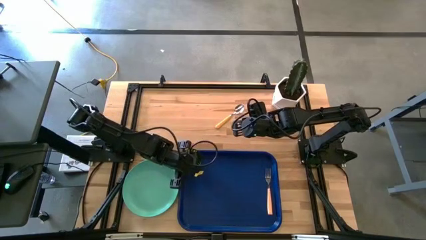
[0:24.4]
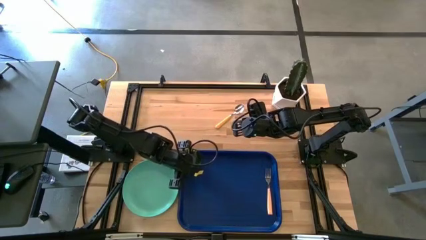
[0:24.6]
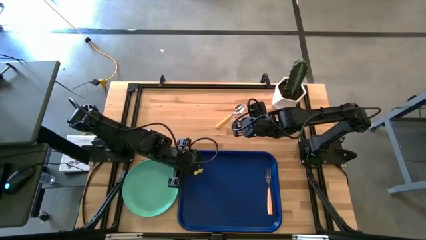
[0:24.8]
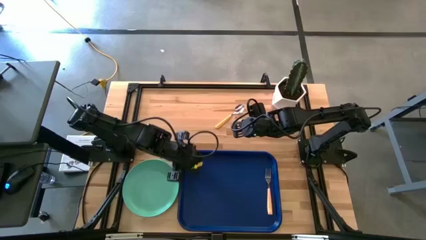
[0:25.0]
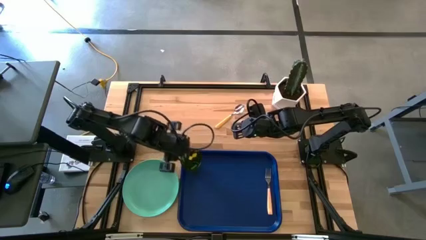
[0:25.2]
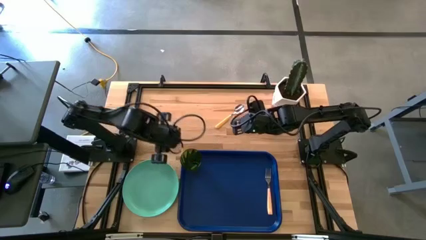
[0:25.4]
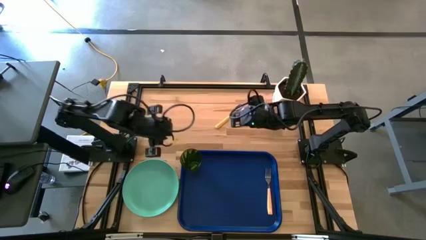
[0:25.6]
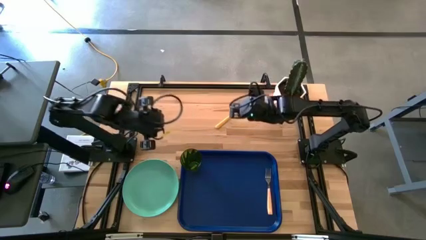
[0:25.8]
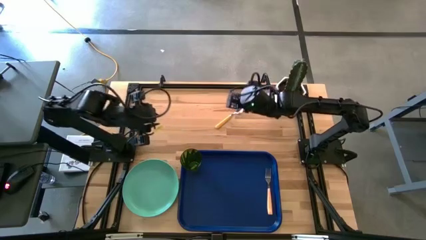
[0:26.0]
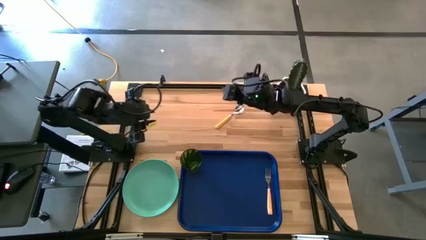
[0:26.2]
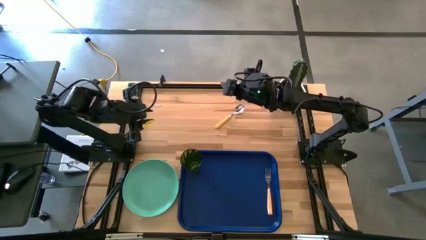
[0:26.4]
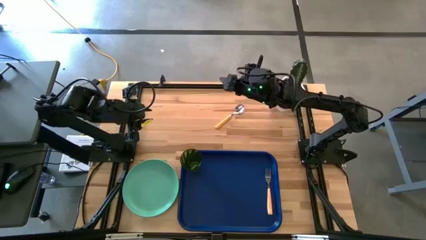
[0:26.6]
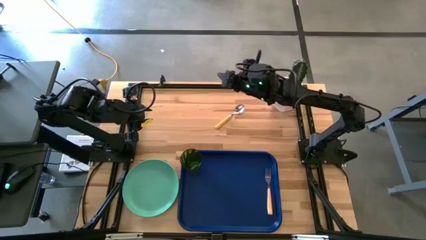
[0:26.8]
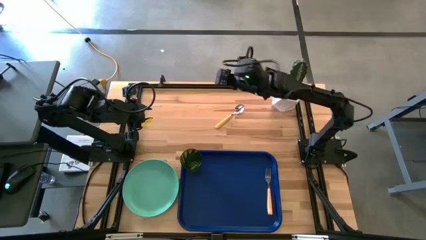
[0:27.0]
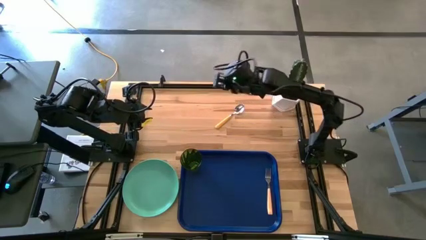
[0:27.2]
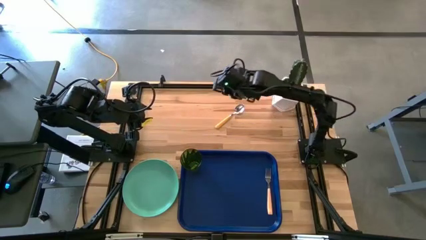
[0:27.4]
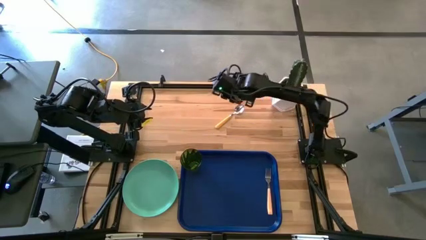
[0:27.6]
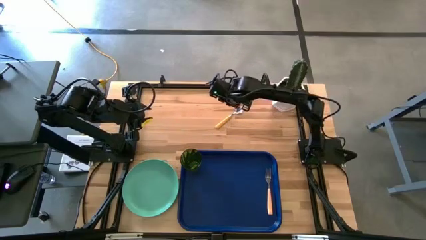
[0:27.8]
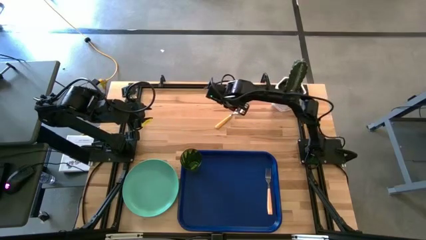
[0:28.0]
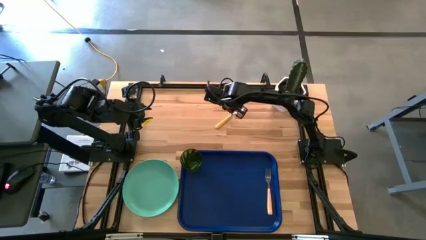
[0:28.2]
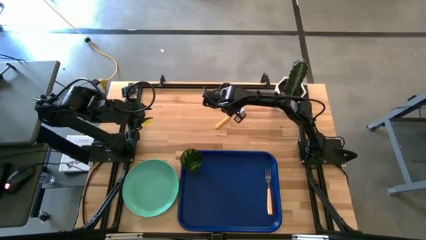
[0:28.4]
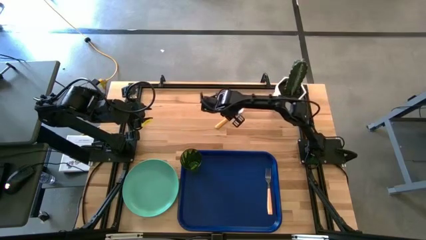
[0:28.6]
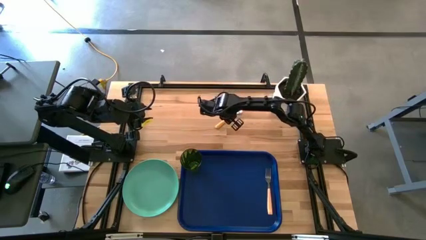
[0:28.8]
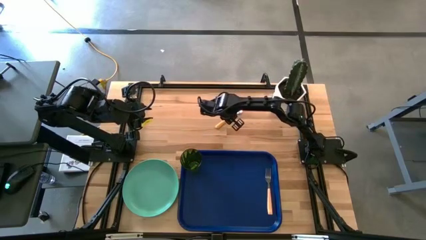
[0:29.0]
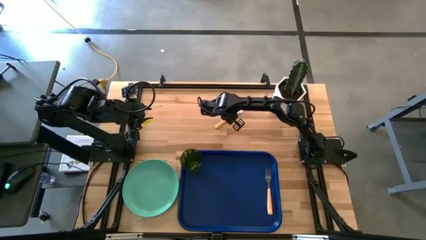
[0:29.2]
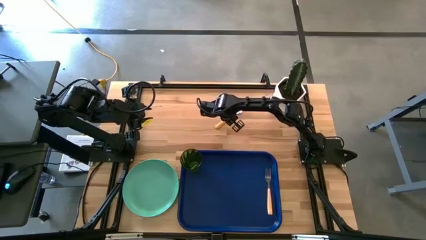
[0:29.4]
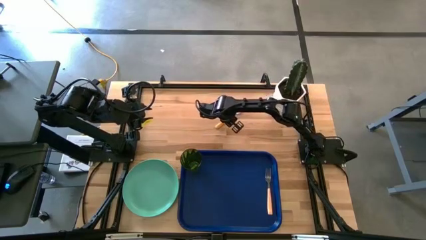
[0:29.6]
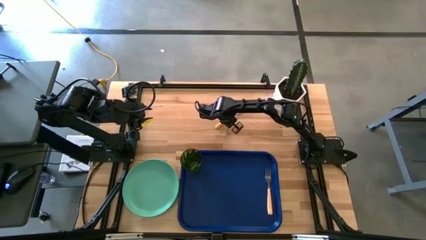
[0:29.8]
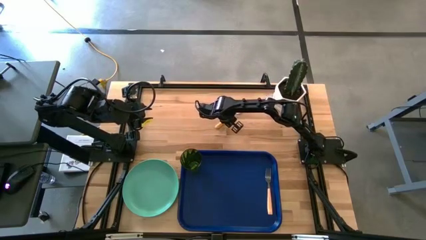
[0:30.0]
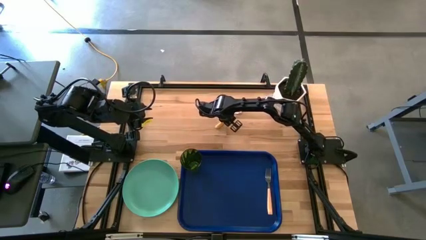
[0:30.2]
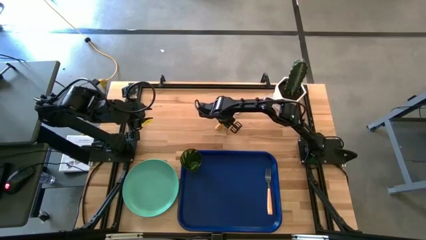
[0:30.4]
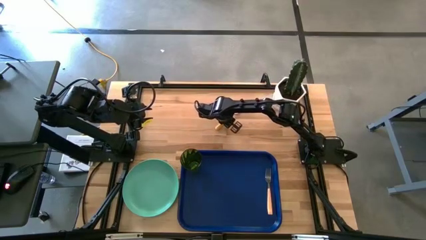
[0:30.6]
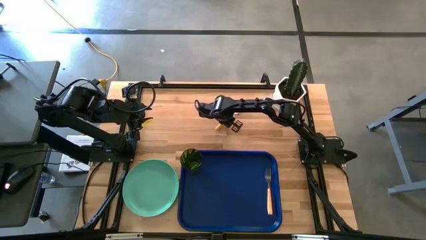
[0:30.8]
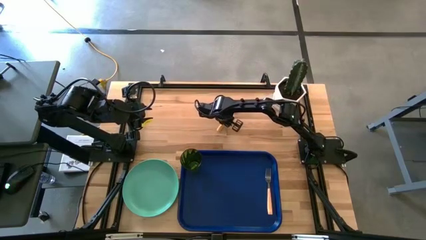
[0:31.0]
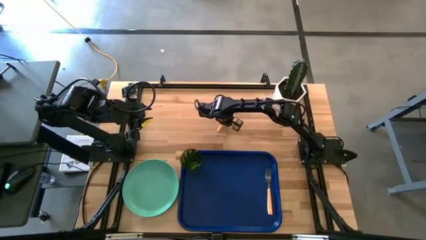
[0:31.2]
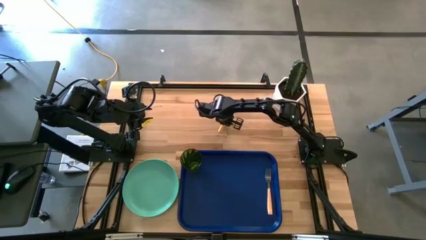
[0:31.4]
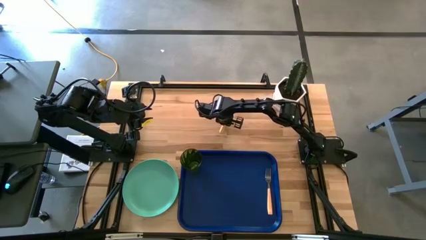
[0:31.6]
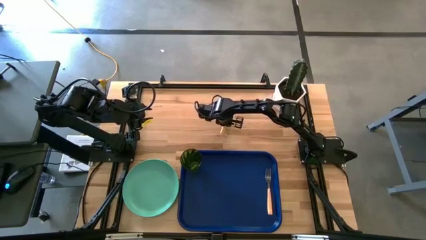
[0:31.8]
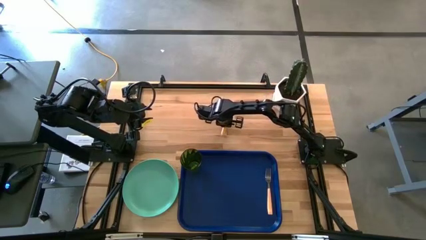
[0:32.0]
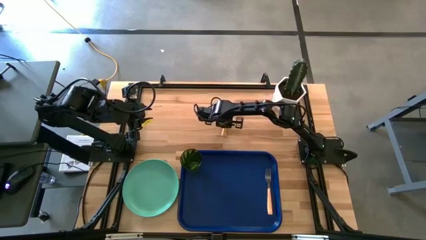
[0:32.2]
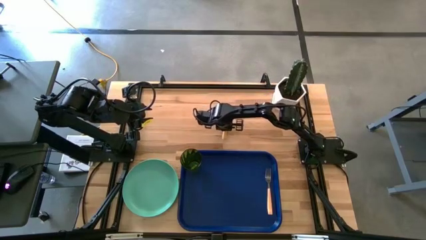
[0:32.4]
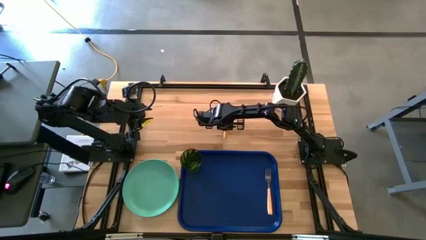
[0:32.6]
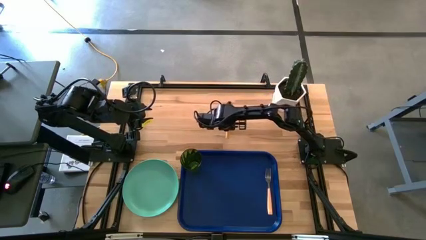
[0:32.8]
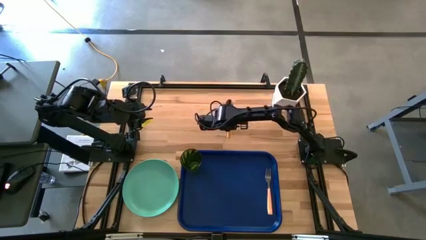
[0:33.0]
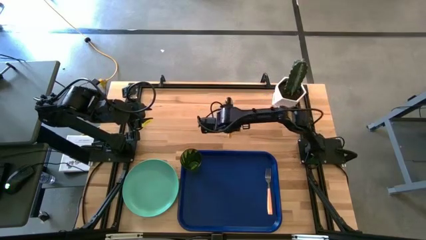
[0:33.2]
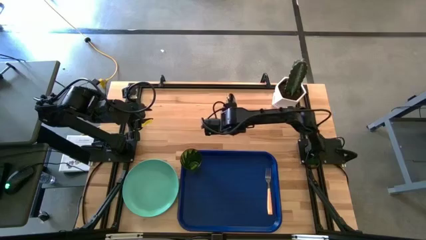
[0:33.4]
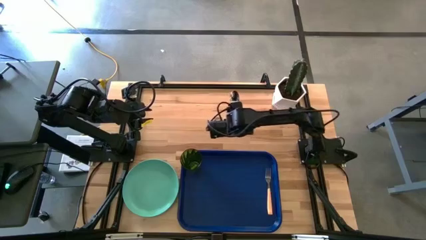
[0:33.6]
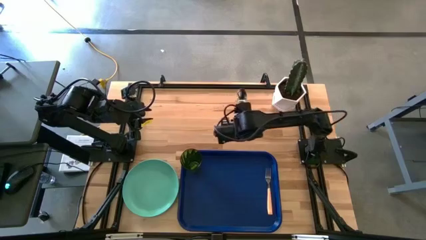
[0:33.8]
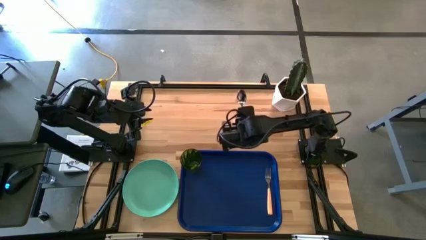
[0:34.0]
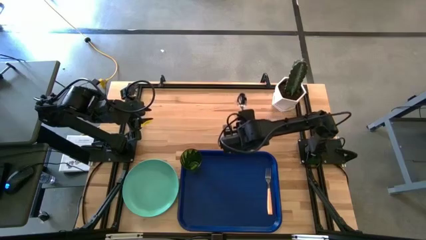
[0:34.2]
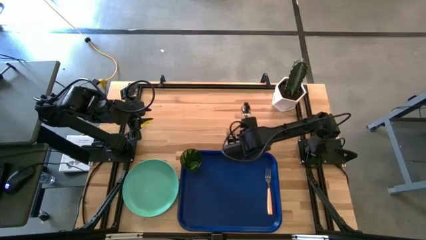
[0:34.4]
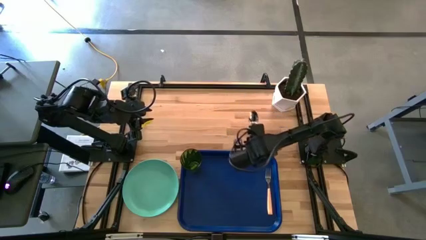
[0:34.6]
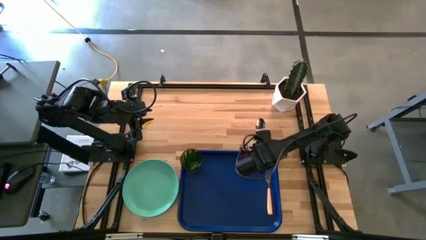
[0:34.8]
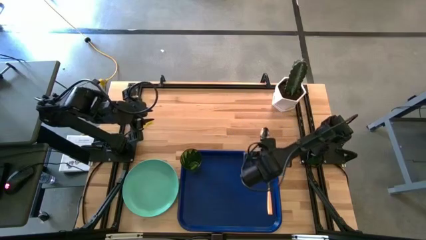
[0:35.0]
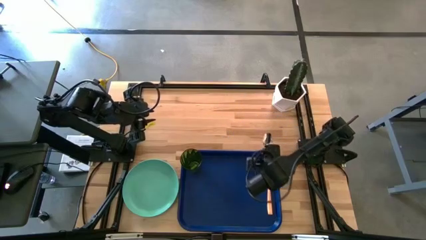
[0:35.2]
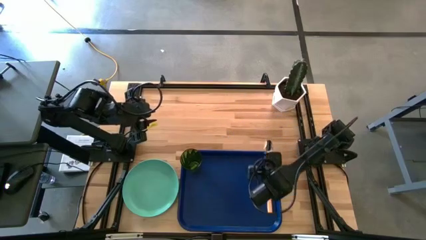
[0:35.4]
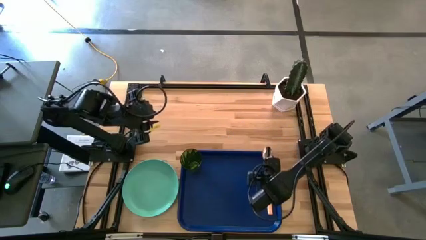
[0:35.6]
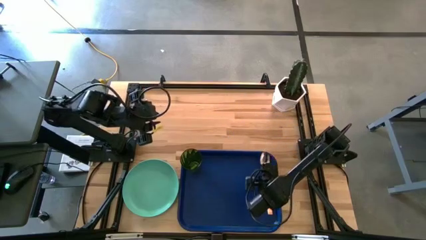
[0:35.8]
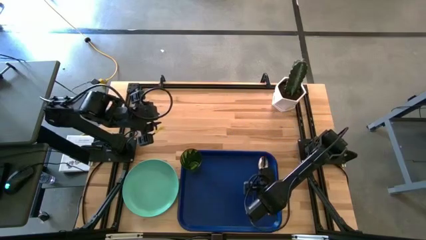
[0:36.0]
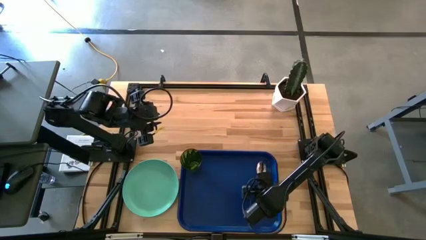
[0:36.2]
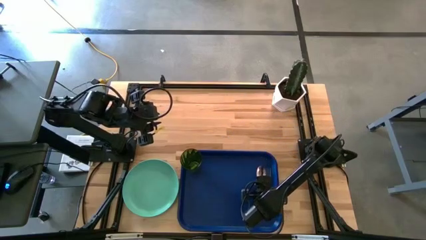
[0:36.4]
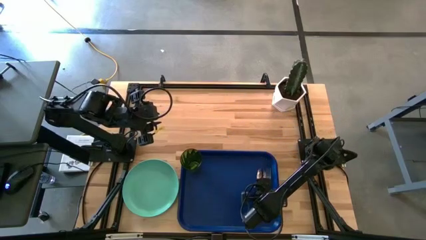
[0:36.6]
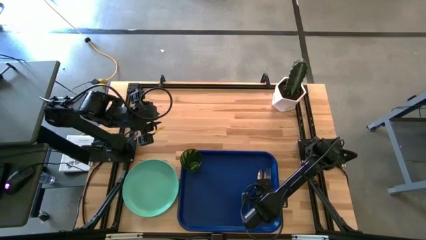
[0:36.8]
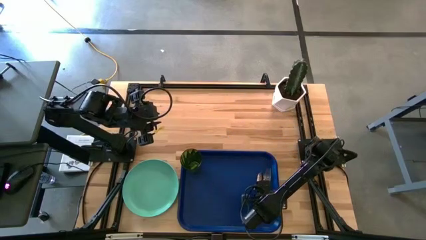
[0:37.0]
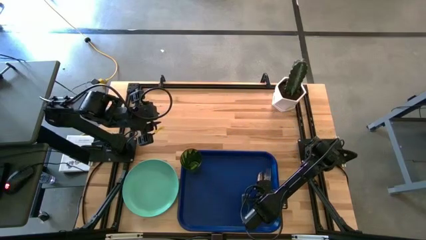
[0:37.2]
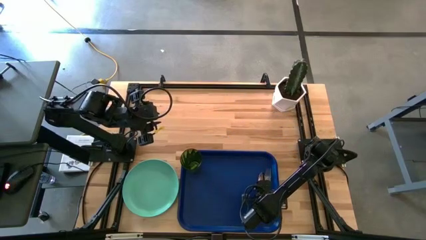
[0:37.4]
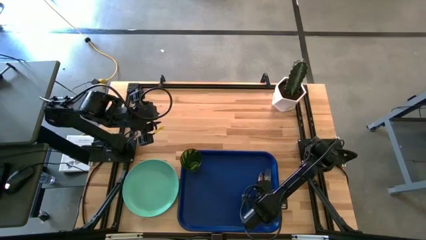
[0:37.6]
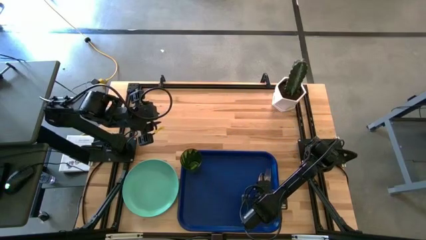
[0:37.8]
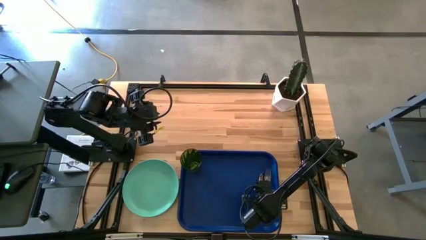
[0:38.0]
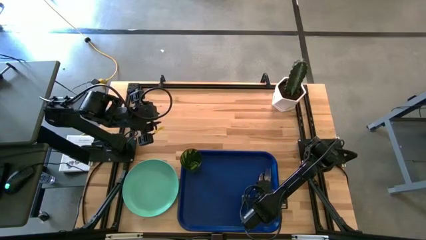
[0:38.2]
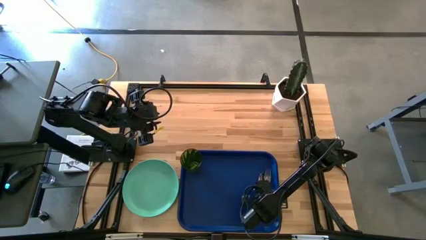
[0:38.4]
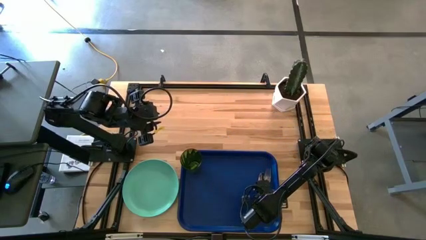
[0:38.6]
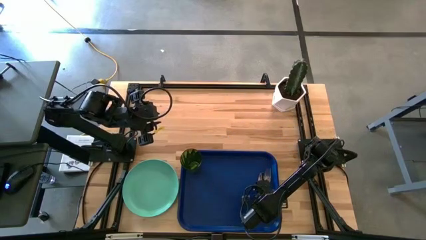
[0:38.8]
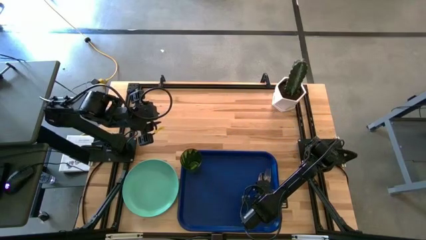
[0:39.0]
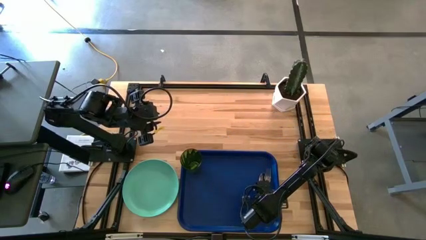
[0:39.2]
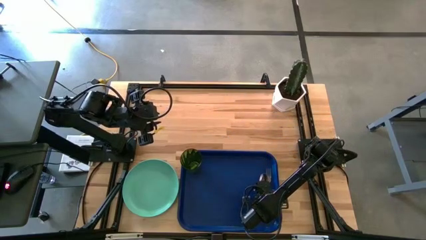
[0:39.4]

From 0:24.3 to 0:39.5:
Task: Pick and place plate/cup/fork/spoon on tray
Put the yellow spoon on the blue tray to the left of the orange fork

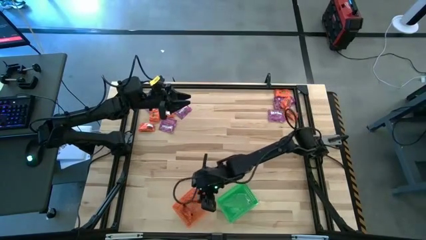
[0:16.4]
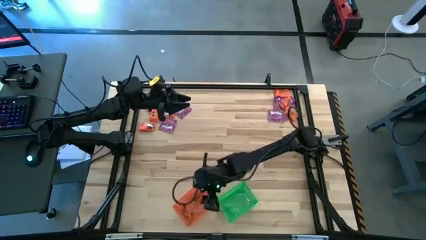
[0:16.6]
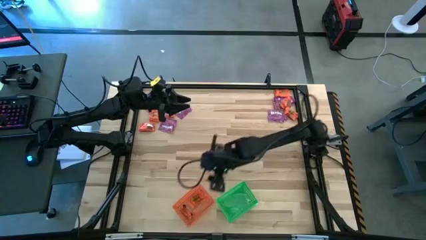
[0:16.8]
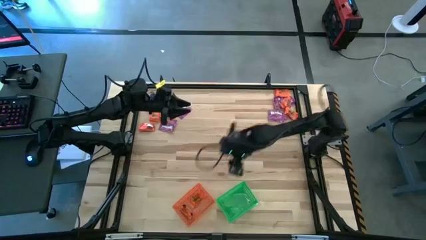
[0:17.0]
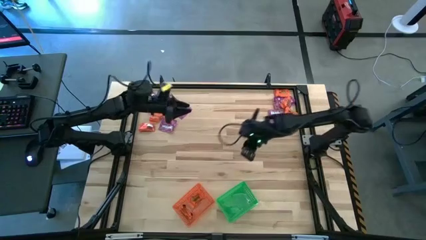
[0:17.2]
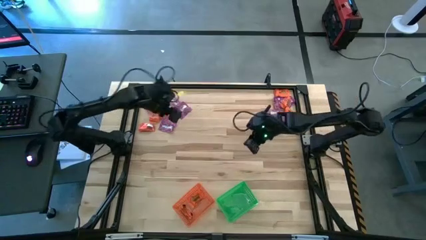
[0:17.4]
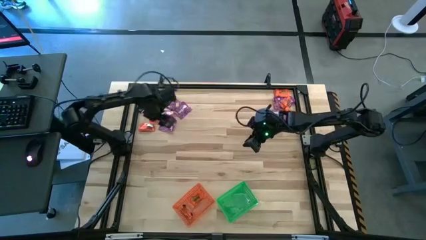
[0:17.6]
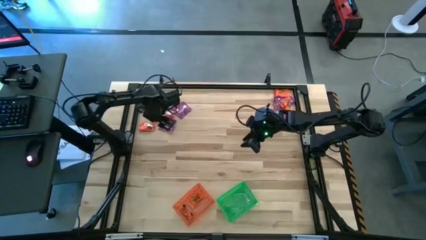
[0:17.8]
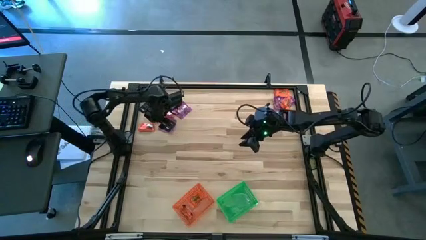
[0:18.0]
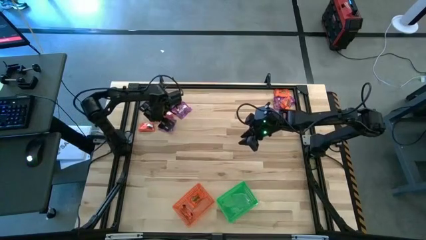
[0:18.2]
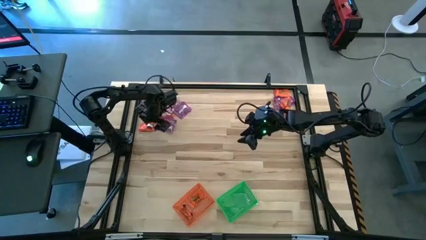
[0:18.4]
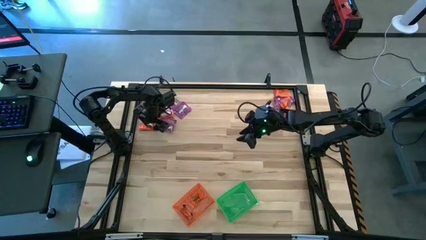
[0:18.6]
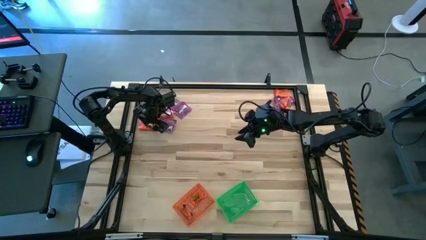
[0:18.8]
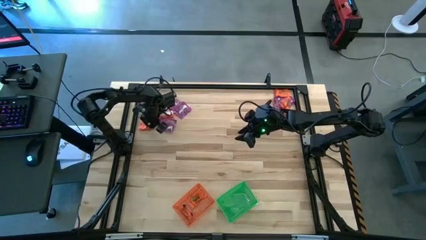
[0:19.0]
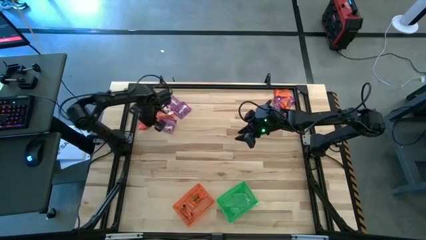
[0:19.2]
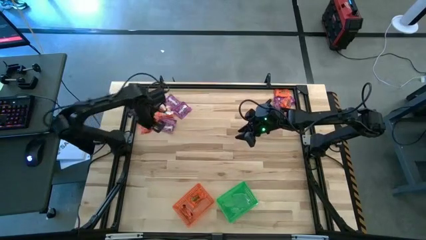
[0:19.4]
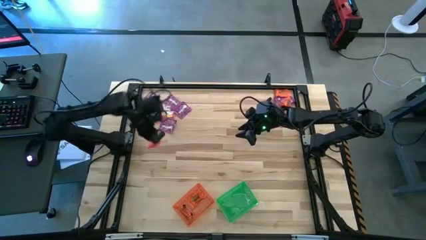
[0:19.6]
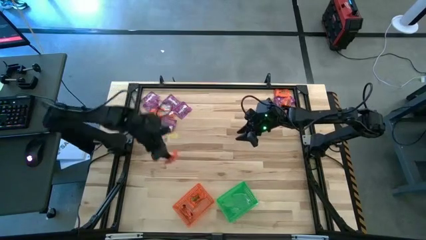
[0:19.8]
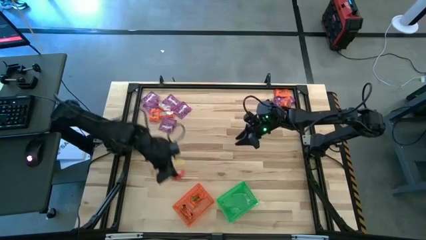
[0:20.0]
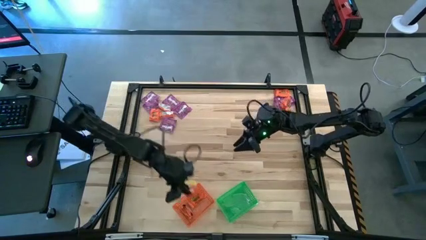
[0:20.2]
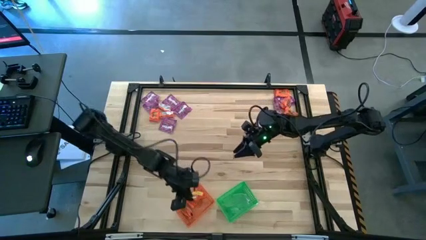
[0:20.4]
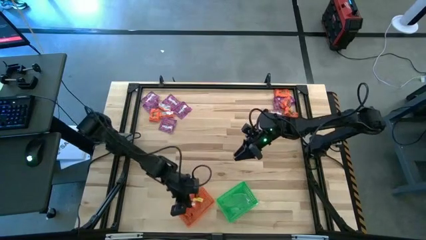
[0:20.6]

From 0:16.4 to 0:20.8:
Task: Sort candy by brand, put in halloween buckets
Put the orange candy into the orange basket
